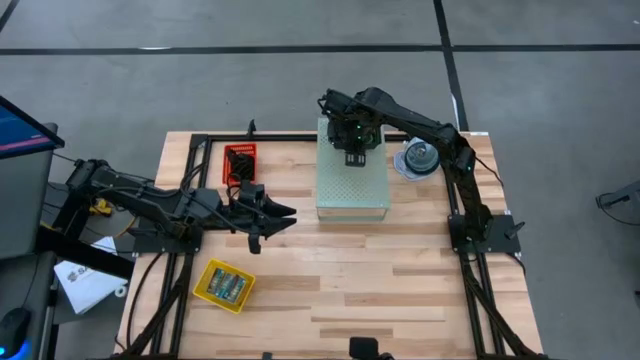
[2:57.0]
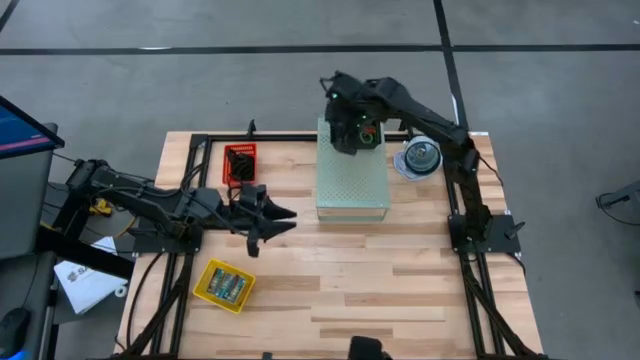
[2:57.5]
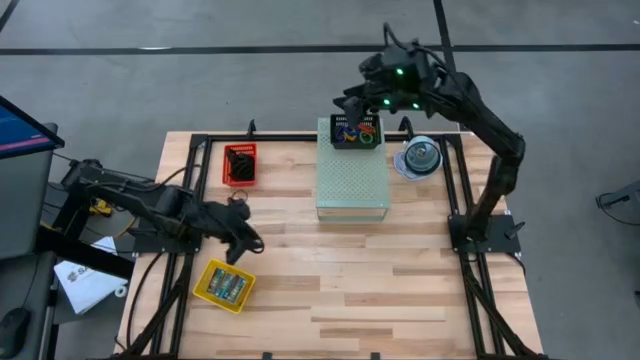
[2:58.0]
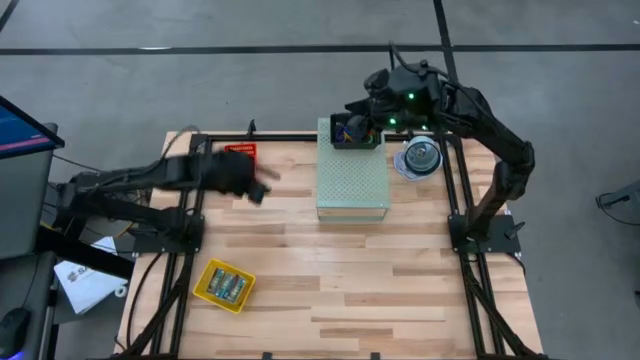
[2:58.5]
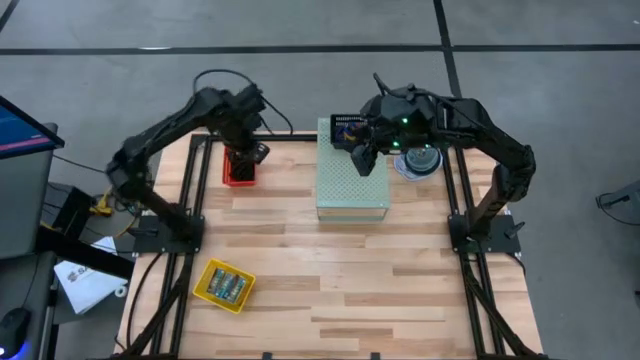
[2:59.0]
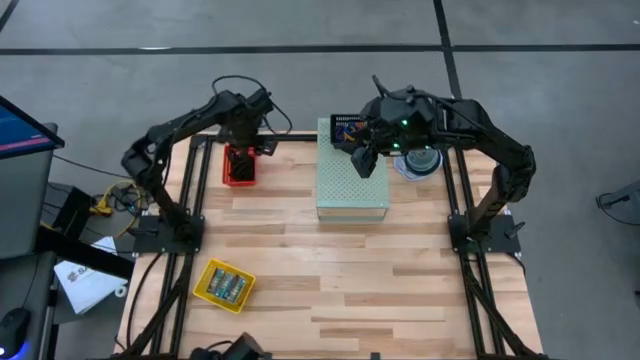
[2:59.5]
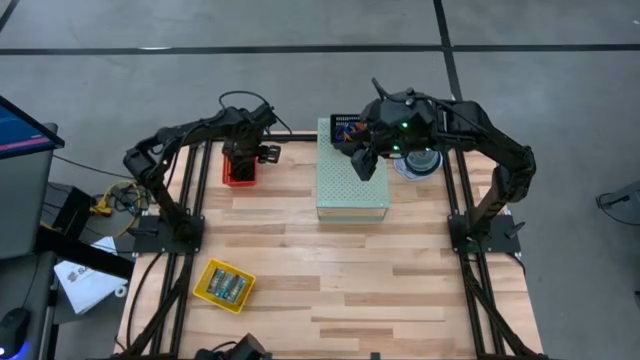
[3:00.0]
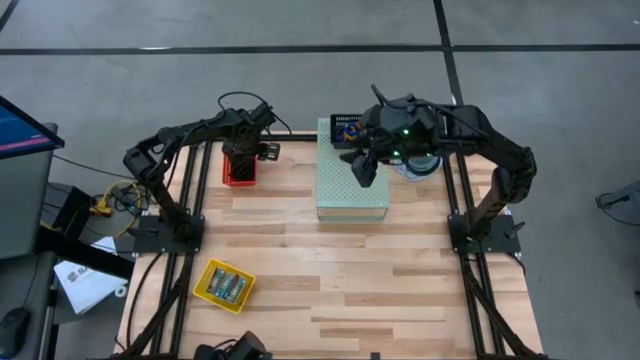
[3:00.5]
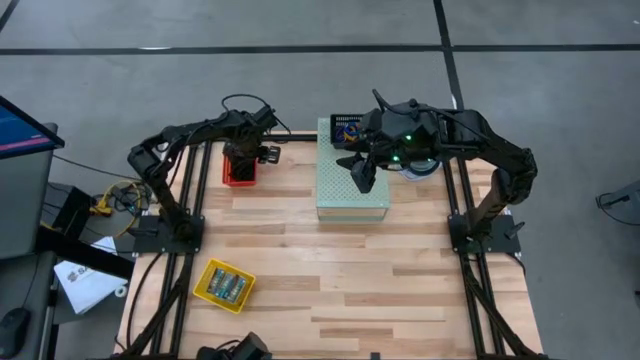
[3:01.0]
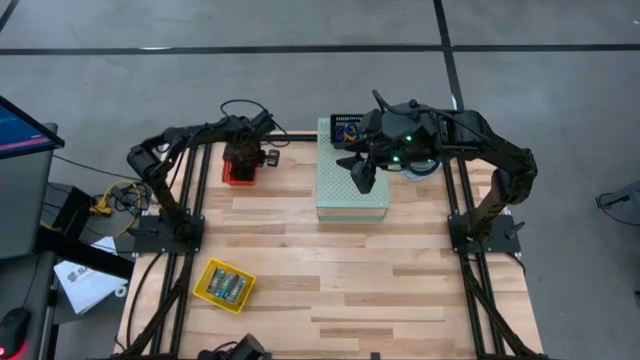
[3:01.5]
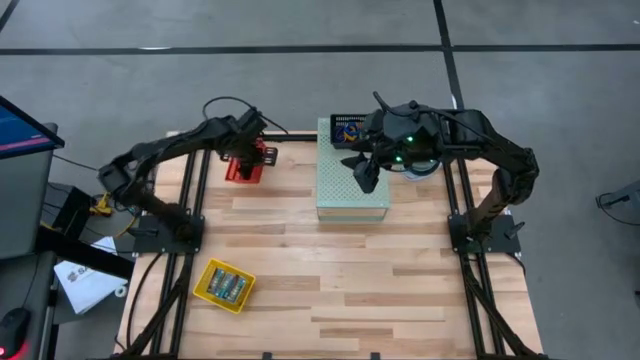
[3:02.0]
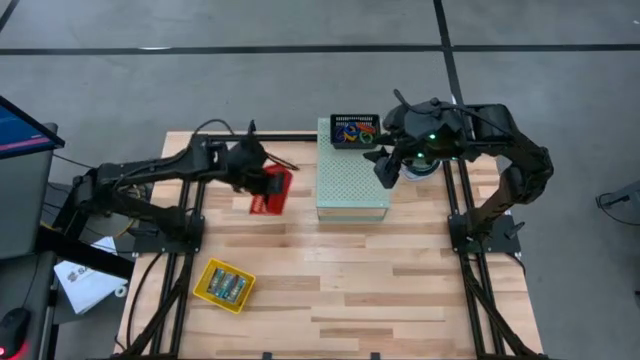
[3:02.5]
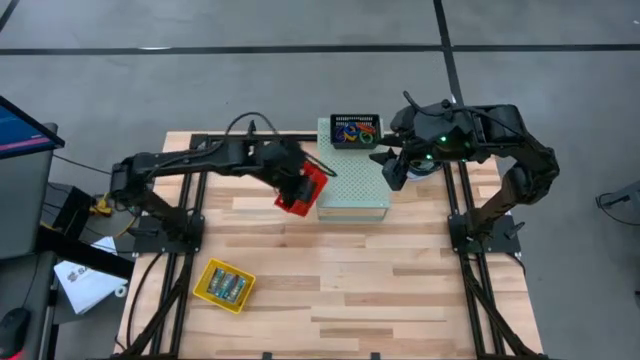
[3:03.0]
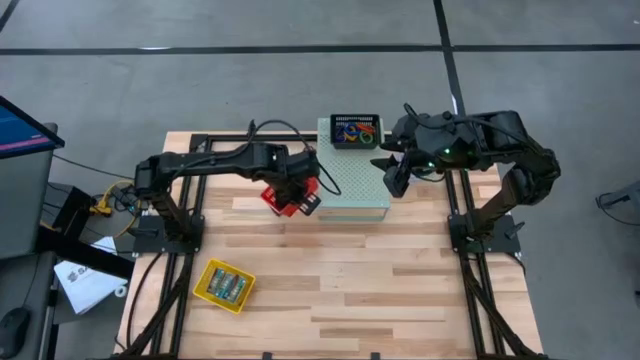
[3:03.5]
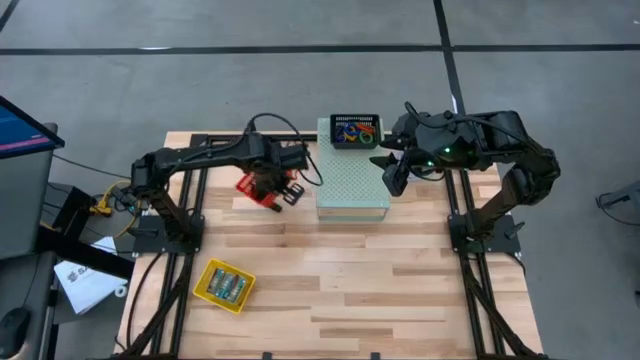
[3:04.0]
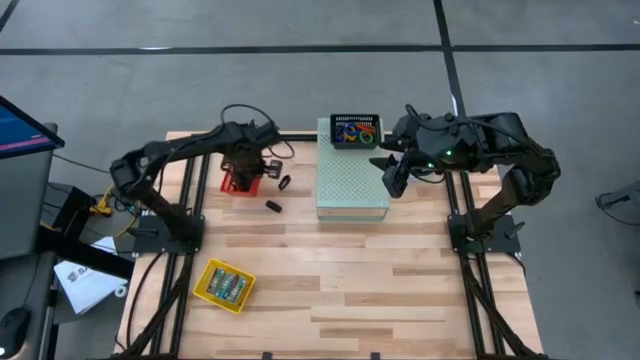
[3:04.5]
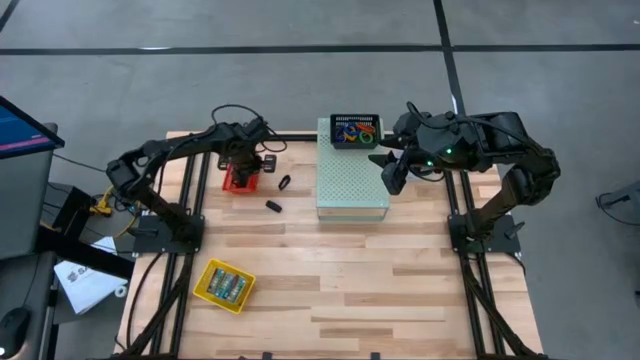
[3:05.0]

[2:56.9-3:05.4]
Task: Pick & Place Office Desk Supplies
Put the red bin on the shelf

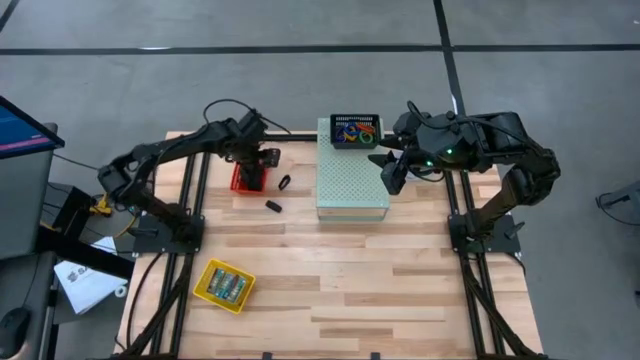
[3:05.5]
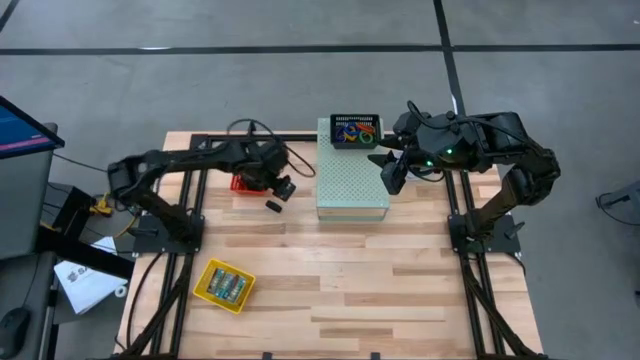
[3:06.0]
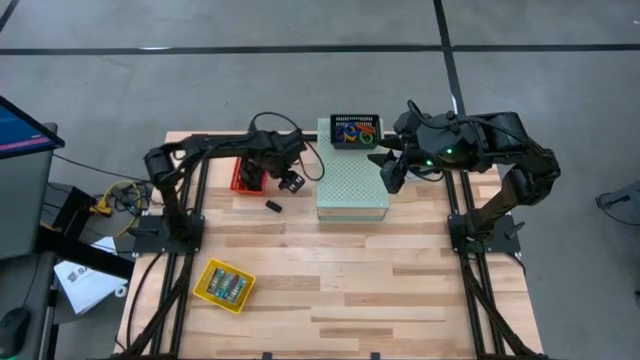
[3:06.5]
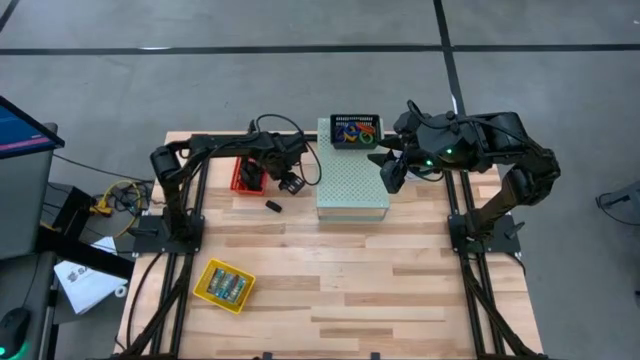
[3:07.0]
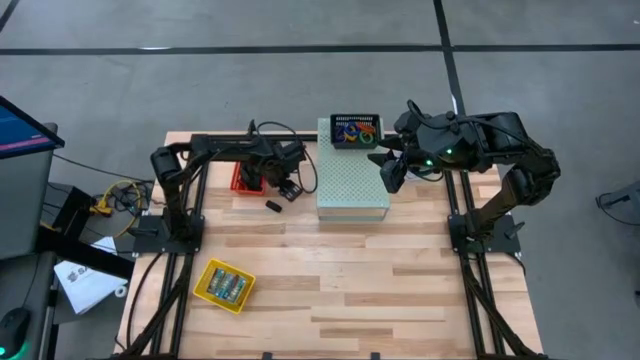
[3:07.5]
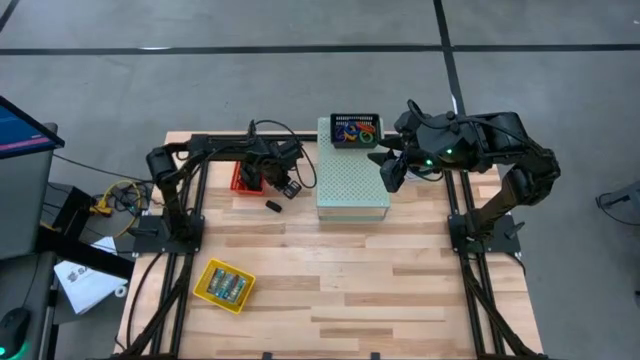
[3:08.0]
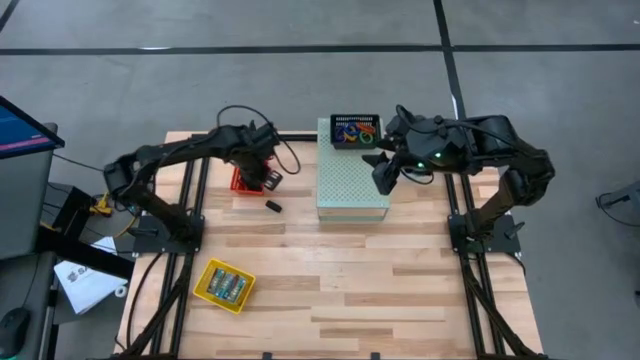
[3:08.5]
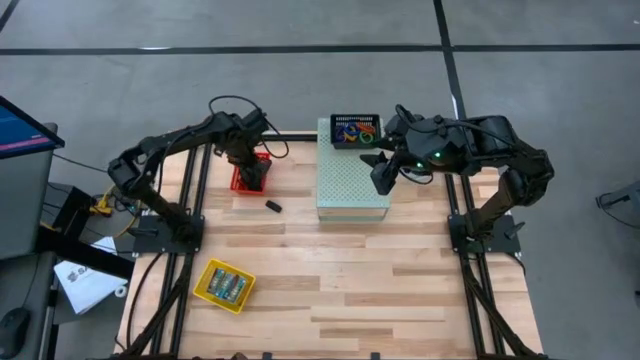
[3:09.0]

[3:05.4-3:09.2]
Put the black rubber band into the red bin

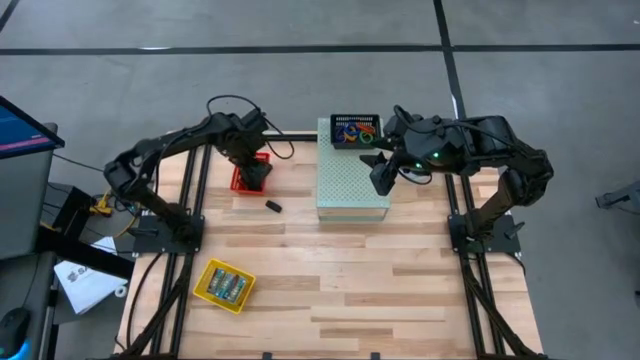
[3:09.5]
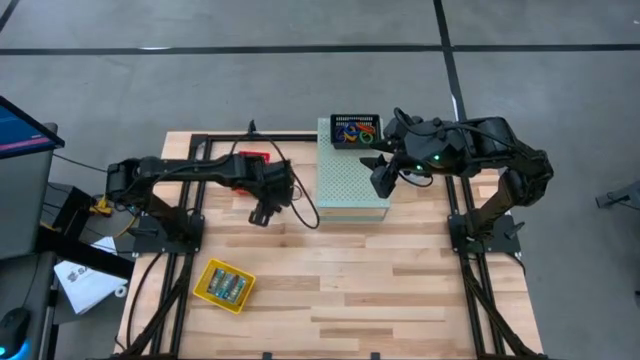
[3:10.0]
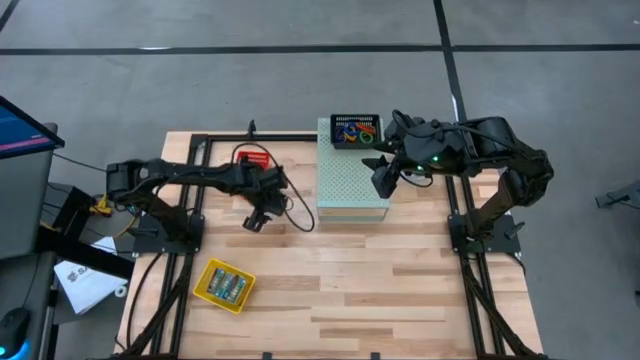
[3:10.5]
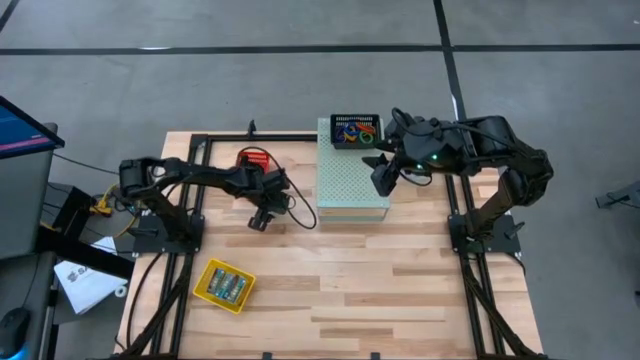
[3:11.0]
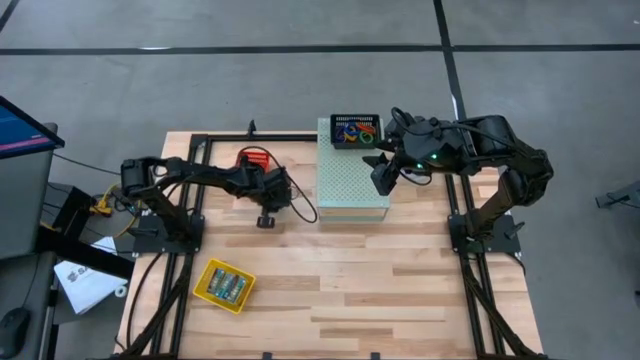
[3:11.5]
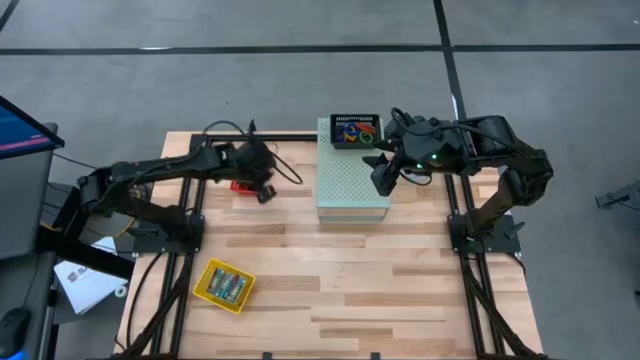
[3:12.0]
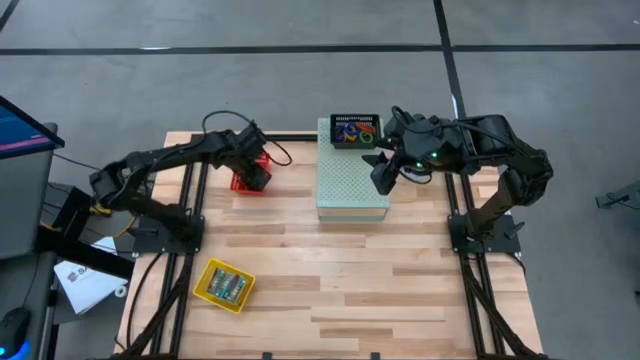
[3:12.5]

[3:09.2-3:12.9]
Put the black rubber band into the red bin

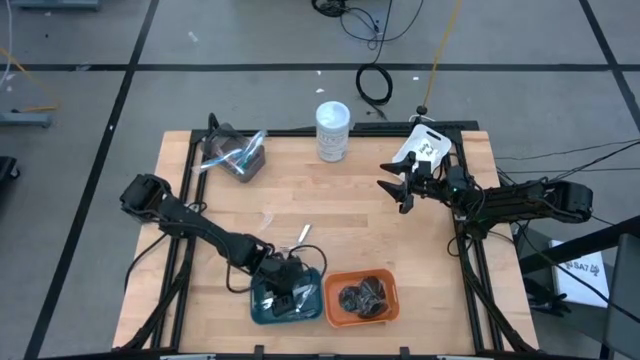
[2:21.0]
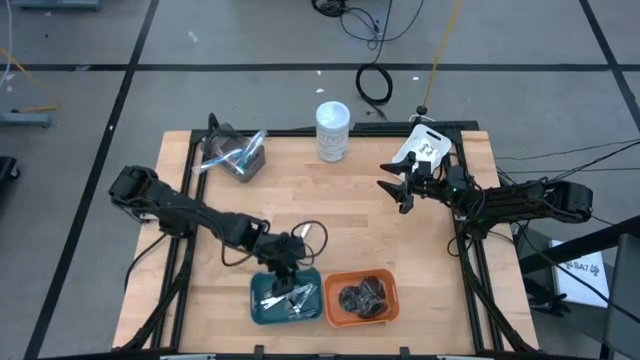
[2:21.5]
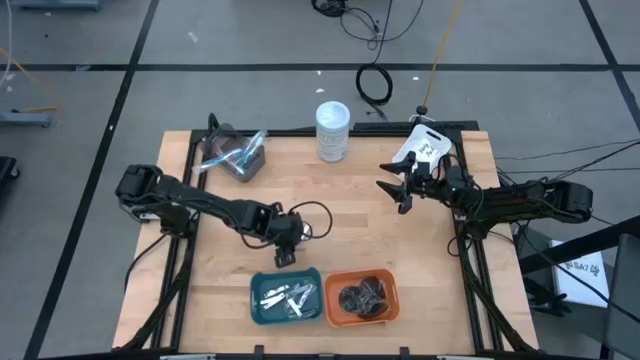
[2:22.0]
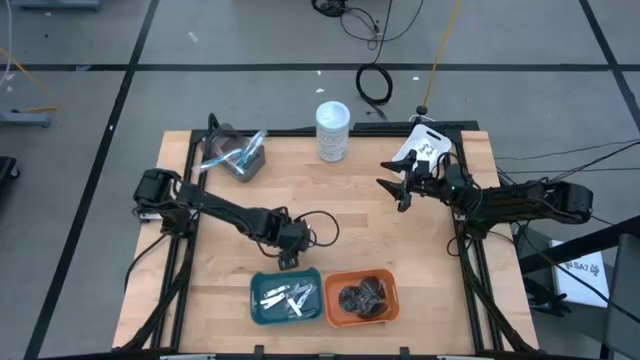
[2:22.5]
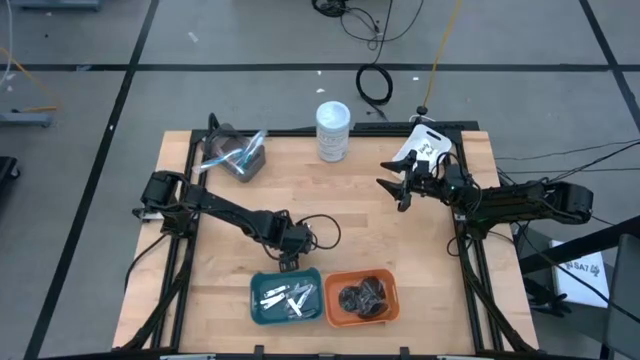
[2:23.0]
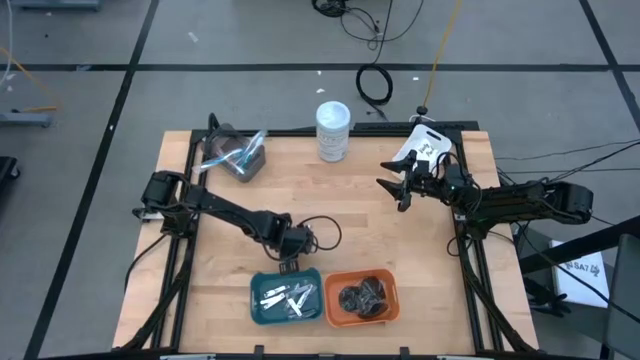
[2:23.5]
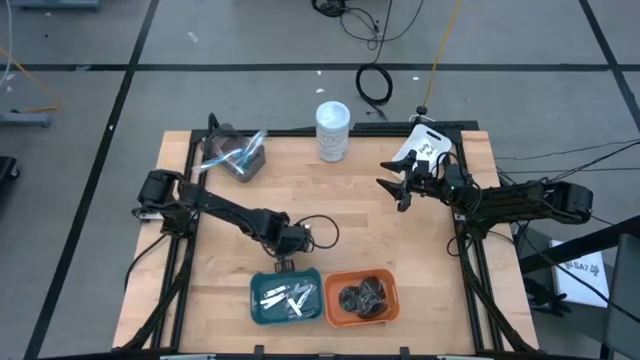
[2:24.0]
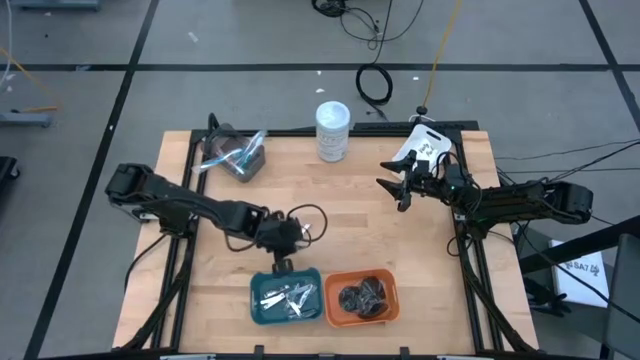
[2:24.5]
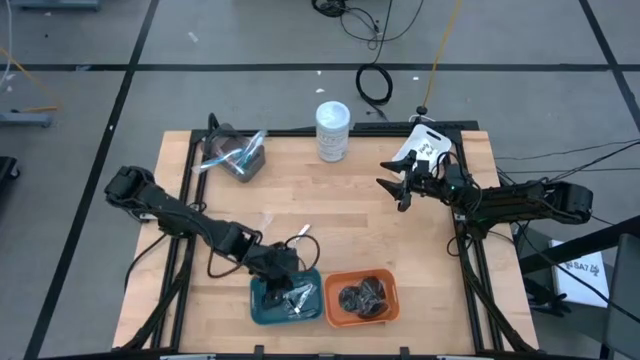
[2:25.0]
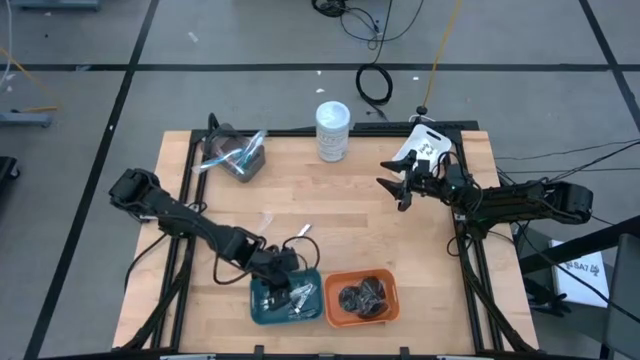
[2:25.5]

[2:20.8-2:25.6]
Task: Pick & Place Travel size toiletries
Put the silver nail cutter into the green bin
